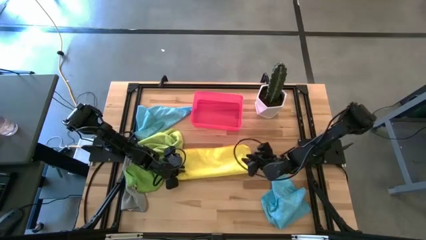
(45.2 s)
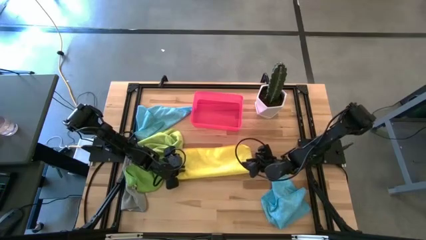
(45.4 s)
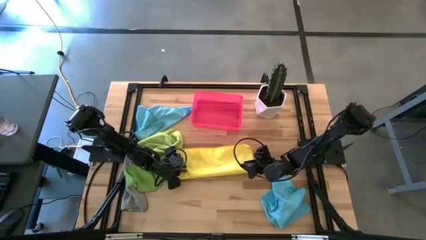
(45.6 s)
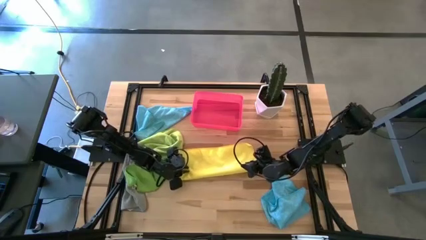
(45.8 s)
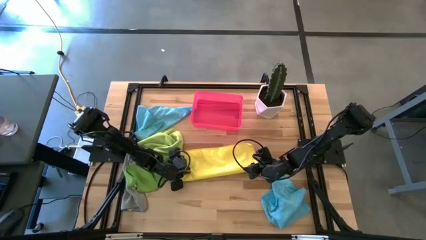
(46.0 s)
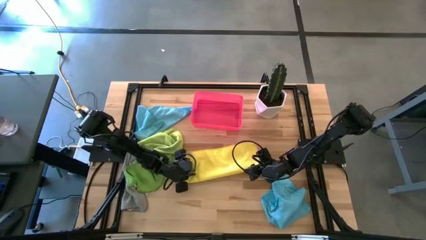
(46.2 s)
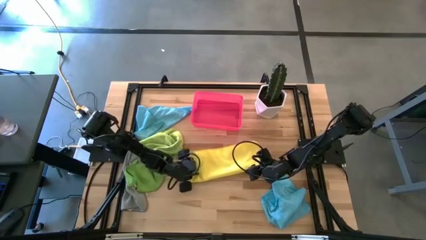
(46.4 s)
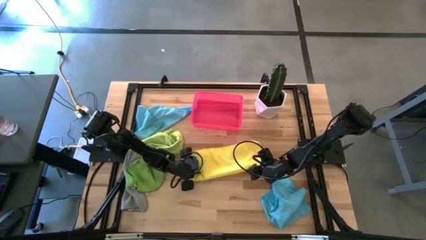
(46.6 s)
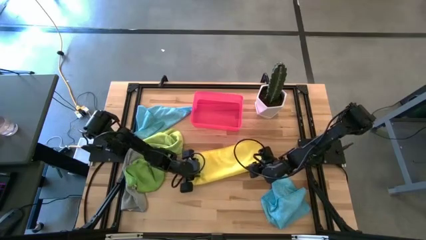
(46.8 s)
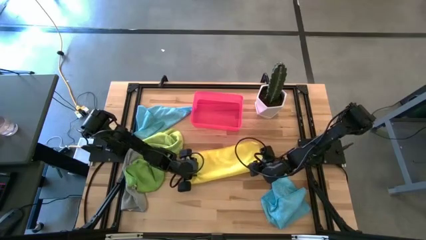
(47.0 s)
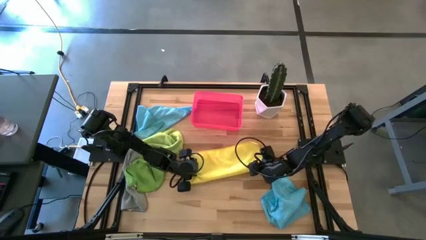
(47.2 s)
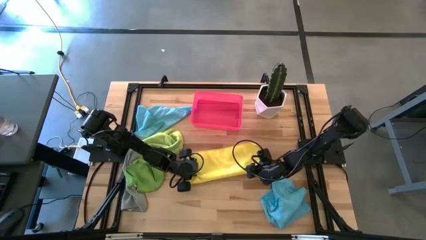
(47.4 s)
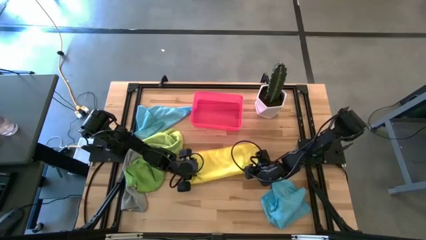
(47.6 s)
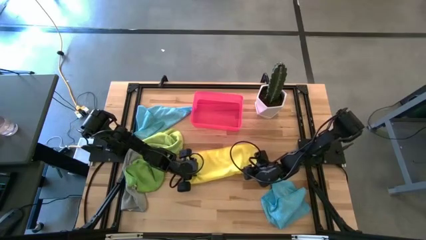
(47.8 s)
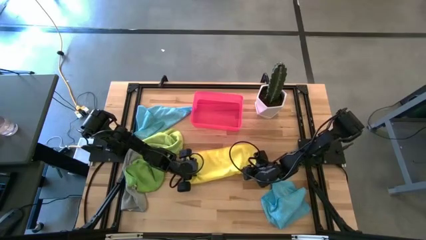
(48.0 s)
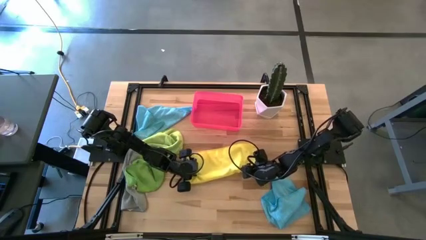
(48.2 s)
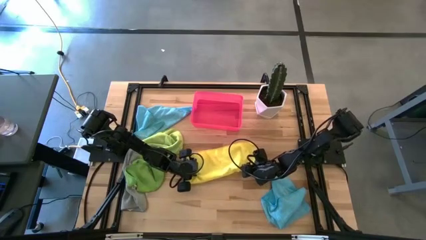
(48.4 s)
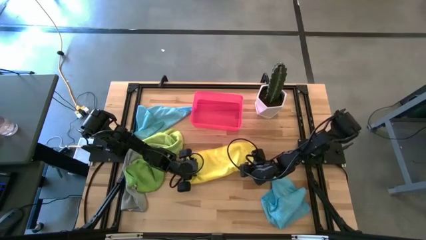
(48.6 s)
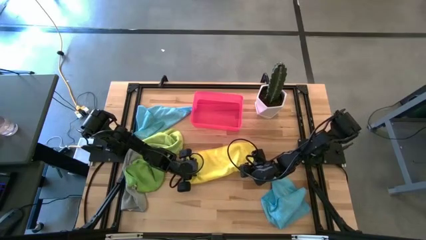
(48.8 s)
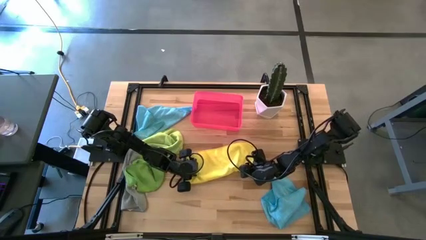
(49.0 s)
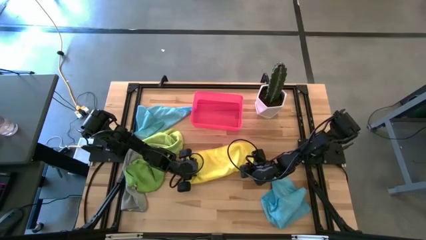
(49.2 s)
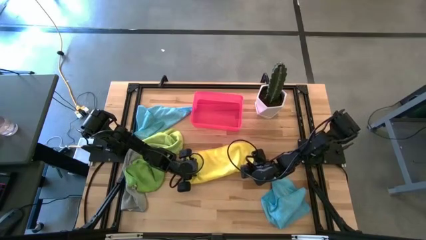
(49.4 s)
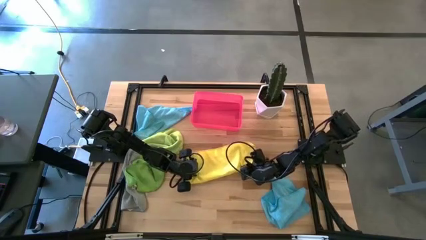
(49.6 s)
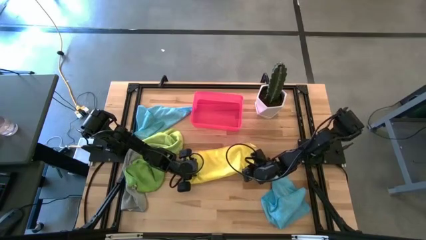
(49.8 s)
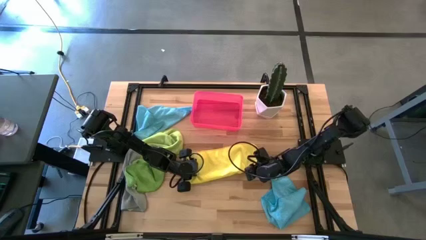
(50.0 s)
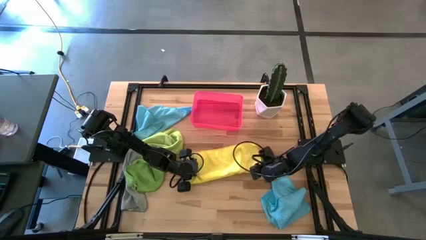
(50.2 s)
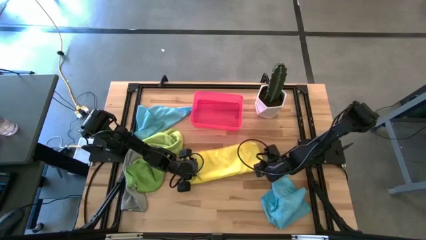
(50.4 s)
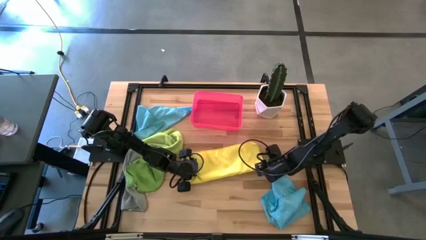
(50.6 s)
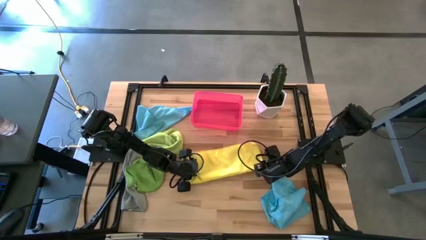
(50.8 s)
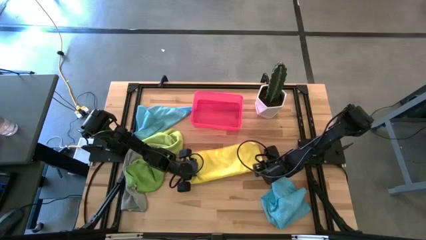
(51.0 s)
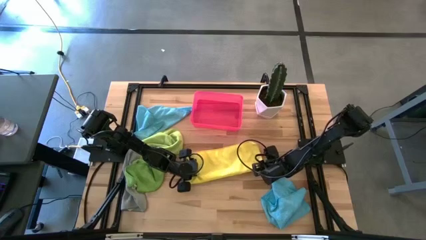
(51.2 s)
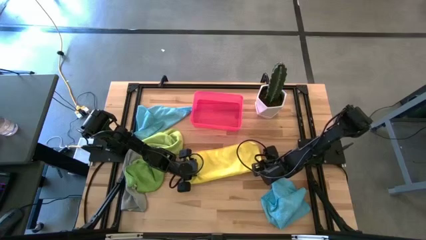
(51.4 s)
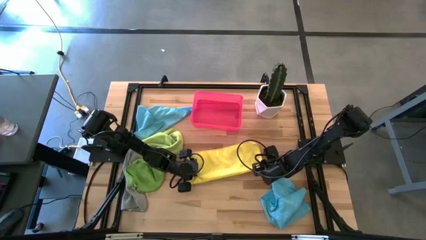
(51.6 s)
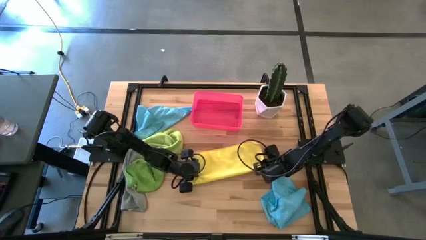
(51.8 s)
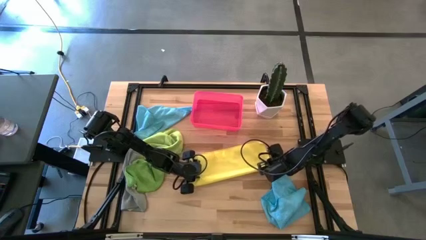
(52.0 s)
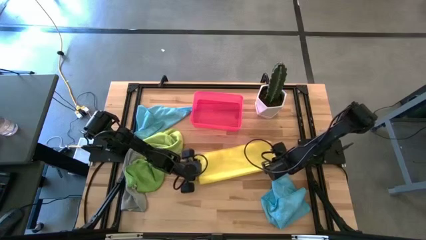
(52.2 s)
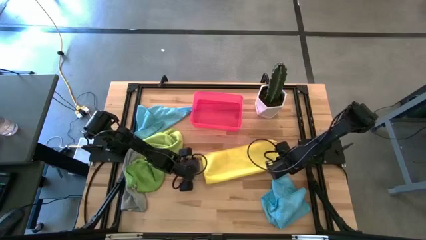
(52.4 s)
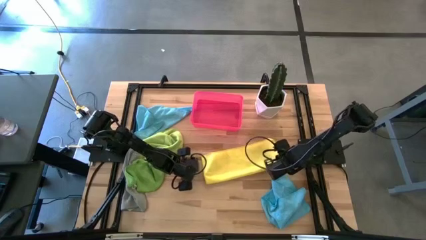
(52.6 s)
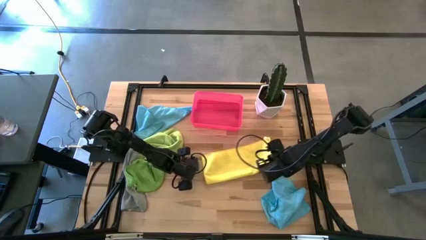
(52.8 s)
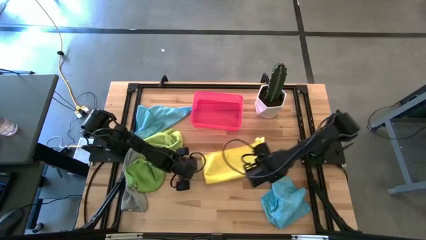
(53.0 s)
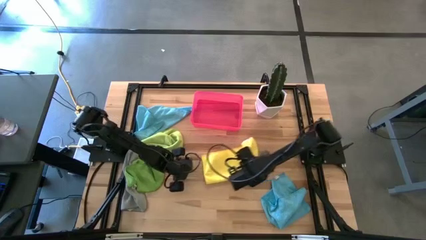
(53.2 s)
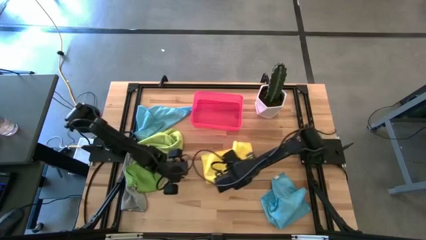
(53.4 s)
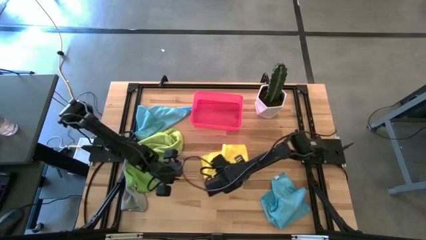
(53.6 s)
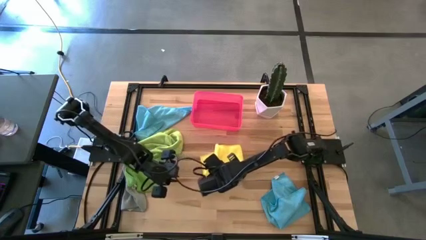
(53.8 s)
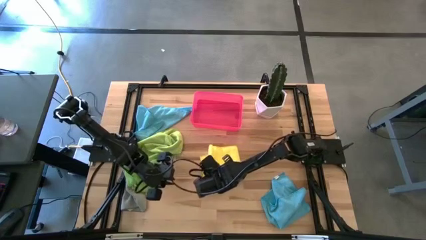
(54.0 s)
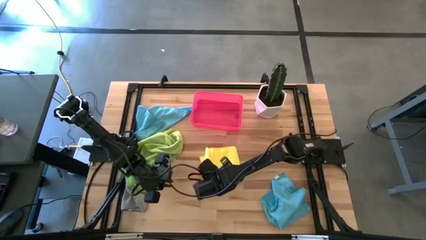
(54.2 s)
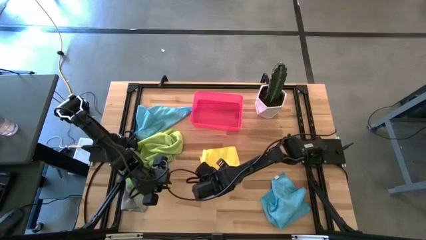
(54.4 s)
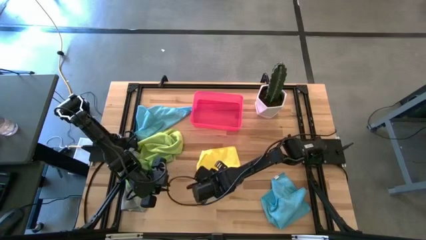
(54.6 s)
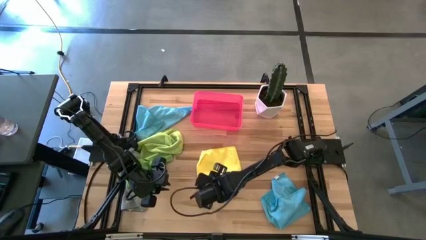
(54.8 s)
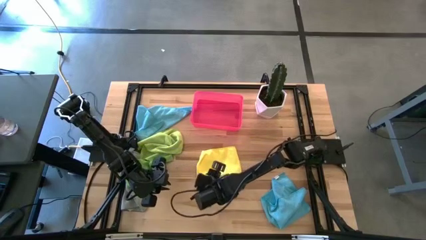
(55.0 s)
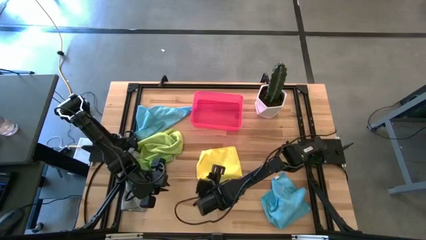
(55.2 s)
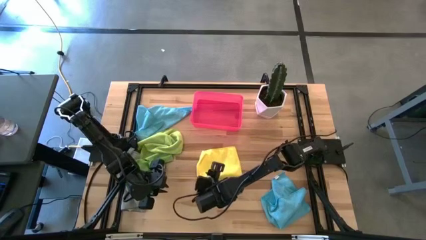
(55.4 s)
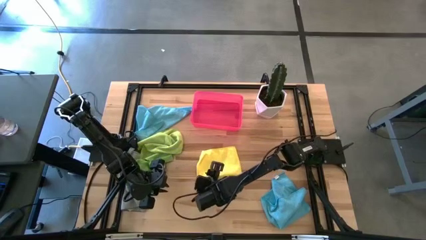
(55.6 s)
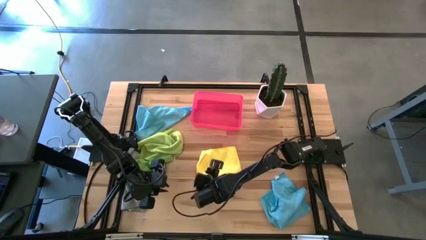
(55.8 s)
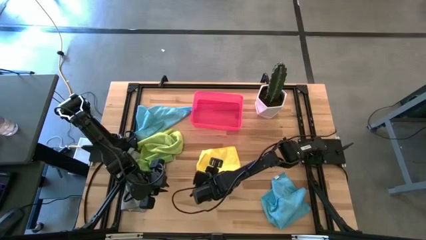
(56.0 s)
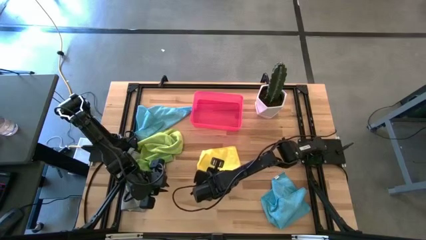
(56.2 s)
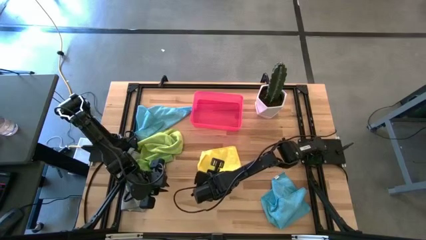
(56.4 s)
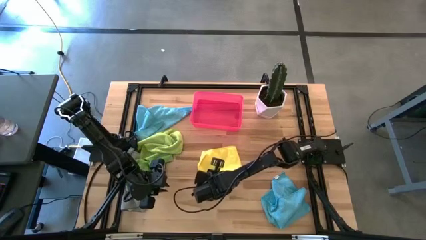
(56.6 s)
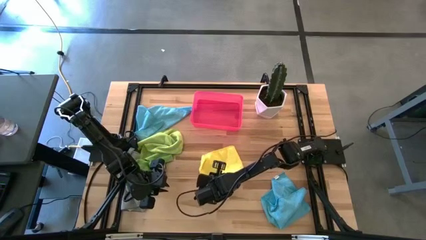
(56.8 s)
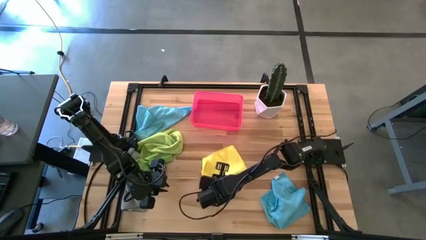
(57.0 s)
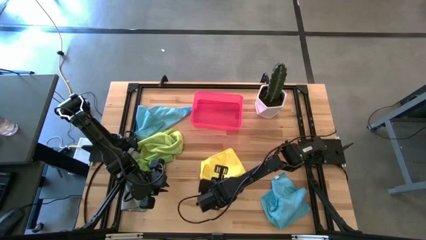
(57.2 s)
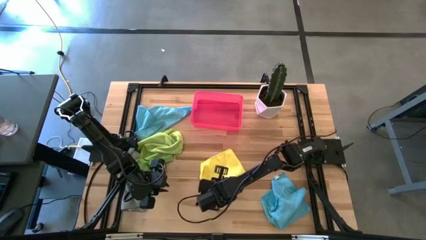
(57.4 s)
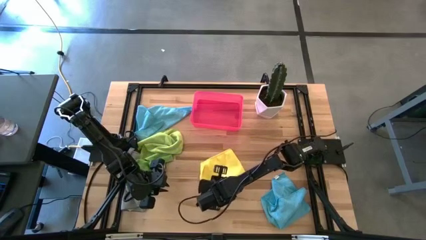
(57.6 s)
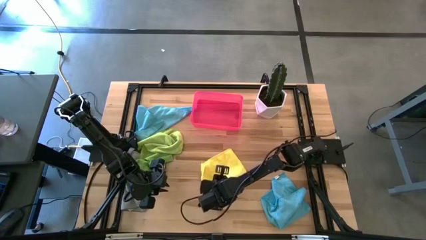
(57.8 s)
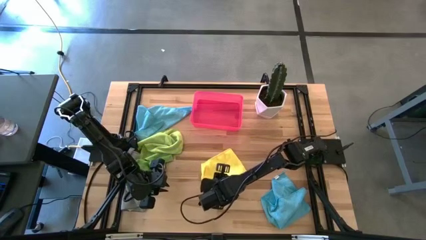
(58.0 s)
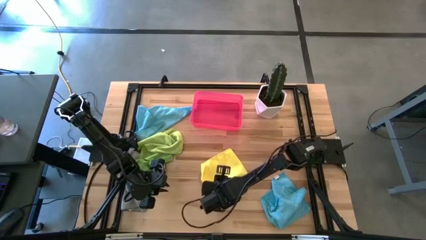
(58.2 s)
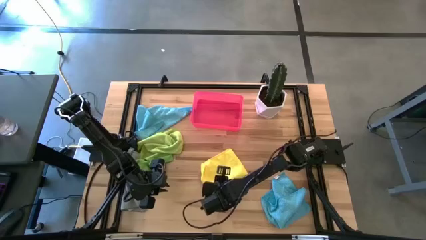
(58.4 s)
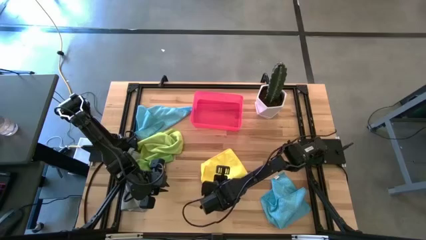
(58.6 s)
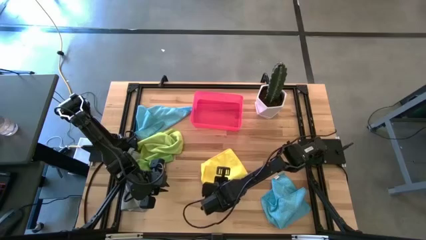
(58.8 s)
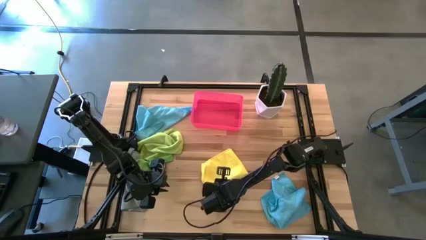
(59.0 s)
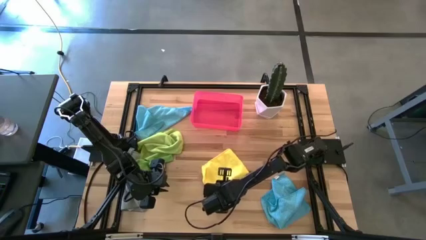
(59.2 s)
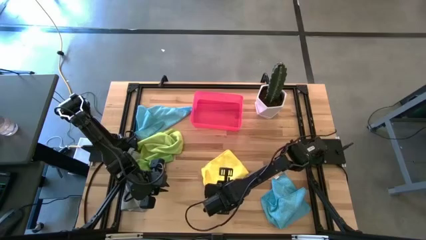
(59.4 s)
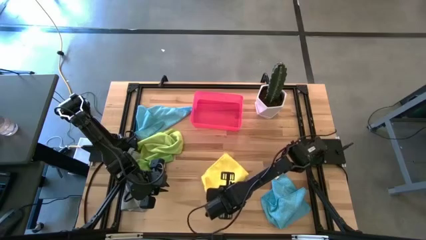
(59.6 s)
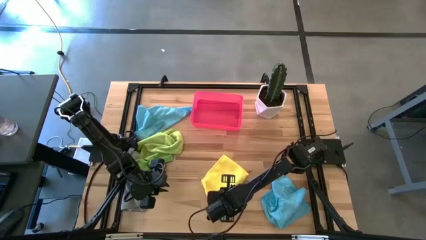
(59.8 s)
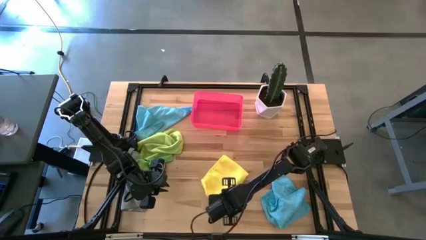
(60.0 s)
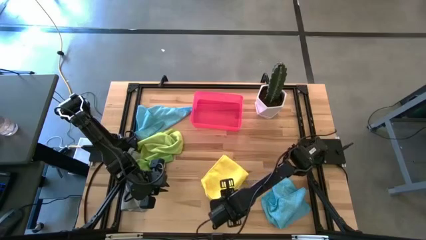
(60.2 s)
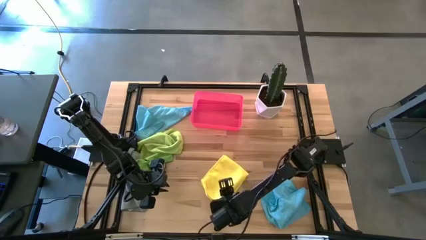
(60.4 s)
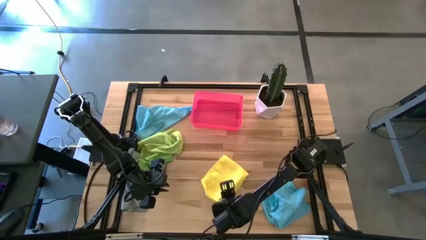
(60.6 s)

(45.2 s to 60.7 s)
Task: Fold microfiber towels
Fold the yellow microfiber cloth on the table

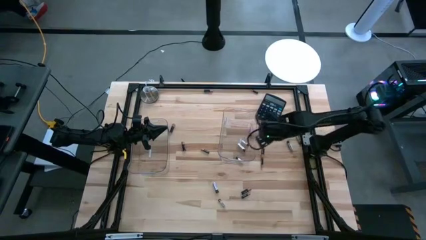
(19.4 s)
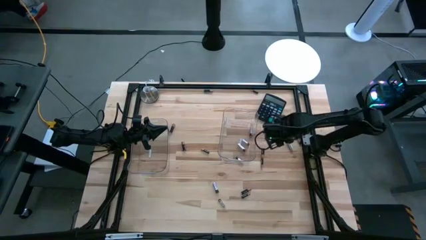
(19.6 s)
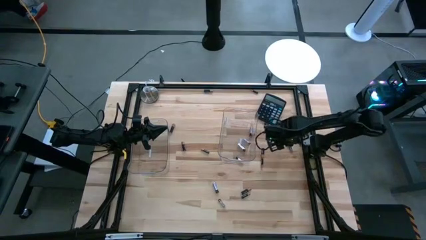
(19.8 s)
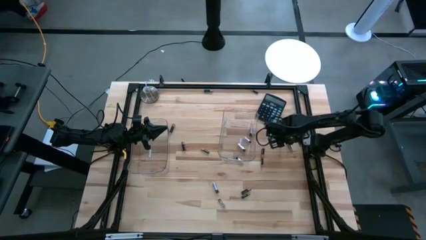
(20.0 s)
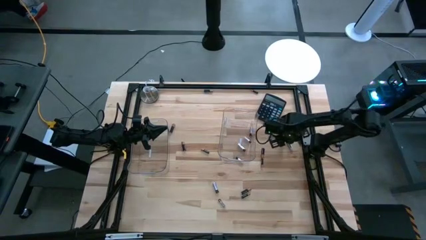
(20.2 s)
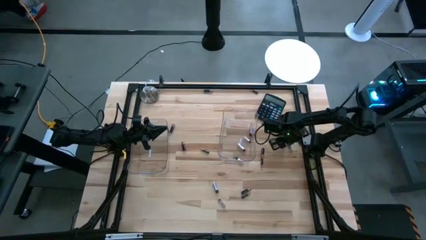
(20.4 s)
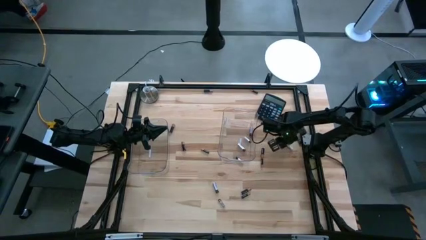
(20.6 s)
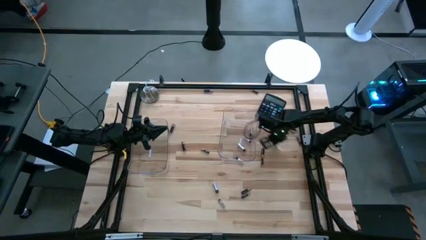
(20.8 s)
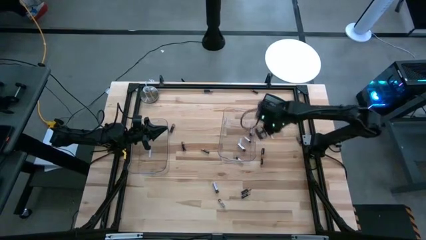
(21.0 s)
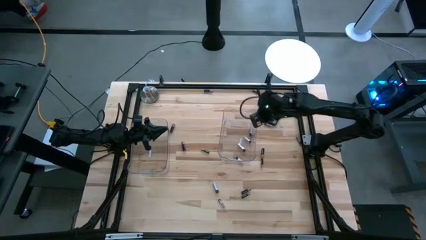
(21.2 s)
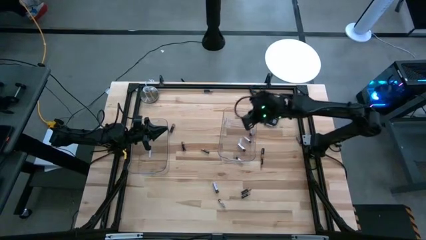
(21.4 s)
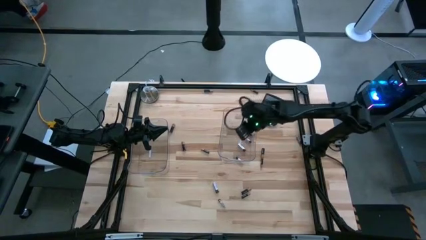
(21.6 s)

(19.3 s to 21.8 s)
Task: Sort batteries
Put the silver battery into the right transparent bin
